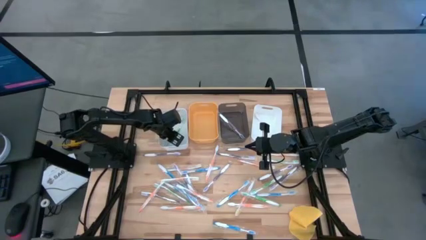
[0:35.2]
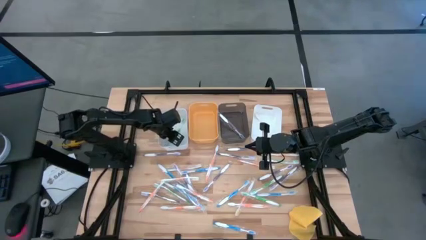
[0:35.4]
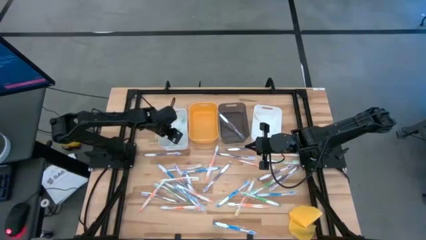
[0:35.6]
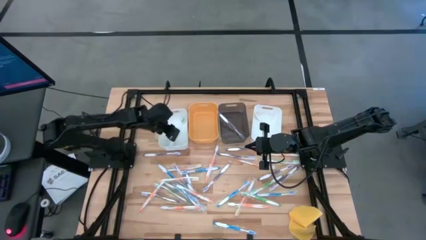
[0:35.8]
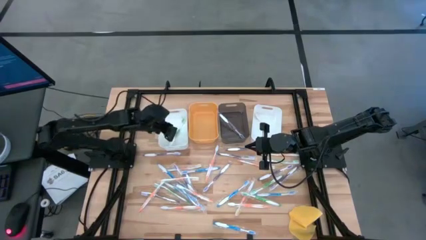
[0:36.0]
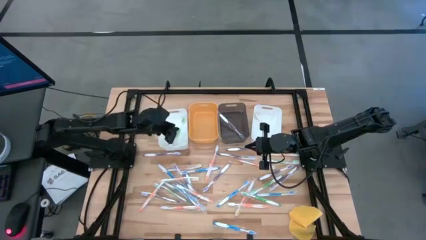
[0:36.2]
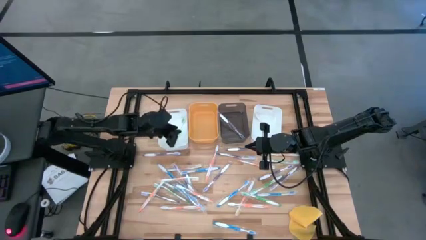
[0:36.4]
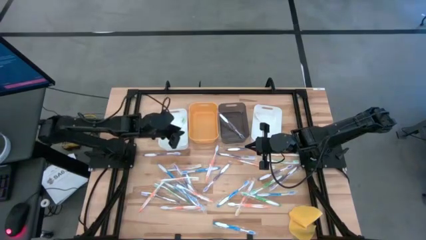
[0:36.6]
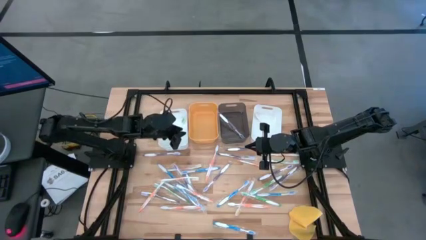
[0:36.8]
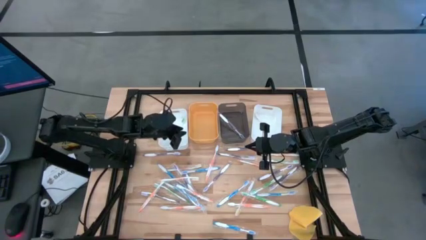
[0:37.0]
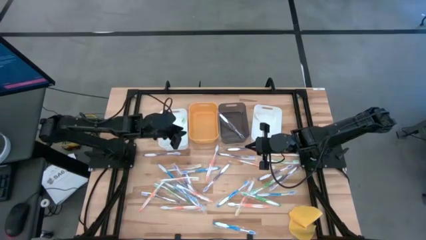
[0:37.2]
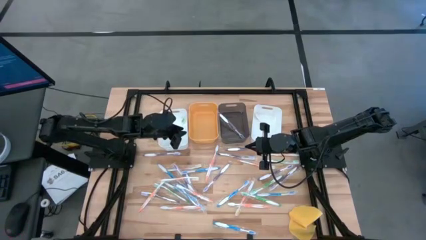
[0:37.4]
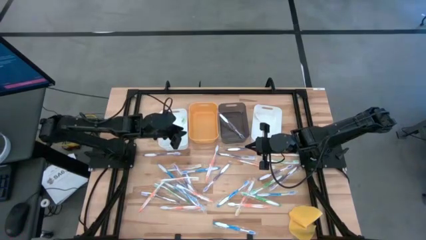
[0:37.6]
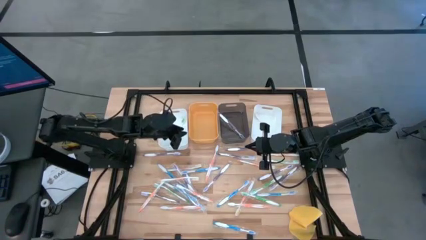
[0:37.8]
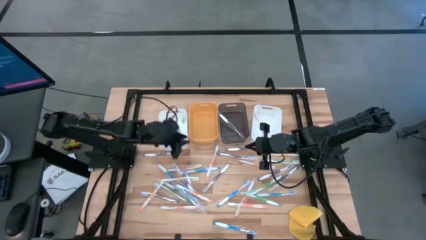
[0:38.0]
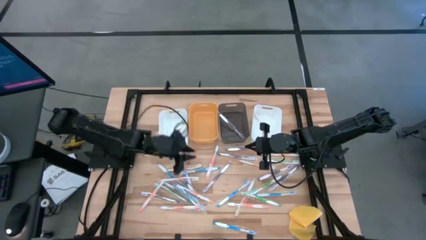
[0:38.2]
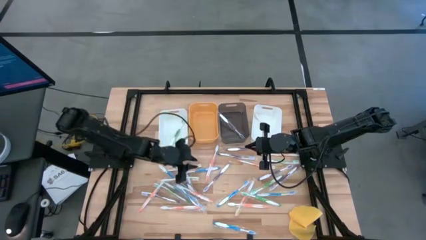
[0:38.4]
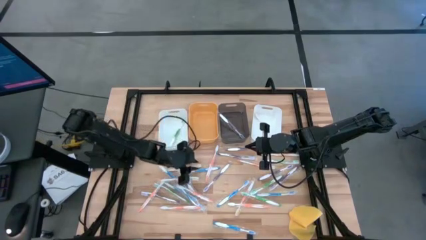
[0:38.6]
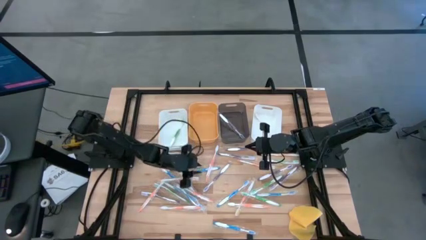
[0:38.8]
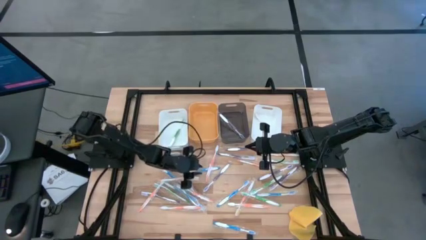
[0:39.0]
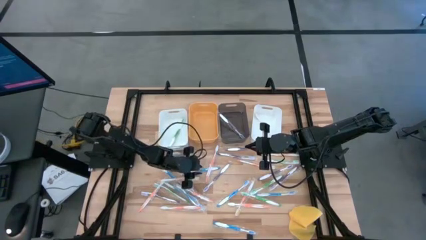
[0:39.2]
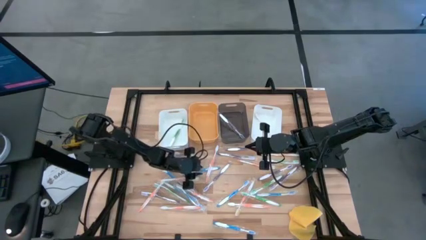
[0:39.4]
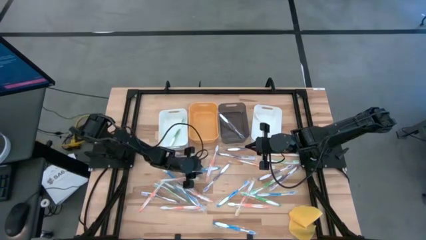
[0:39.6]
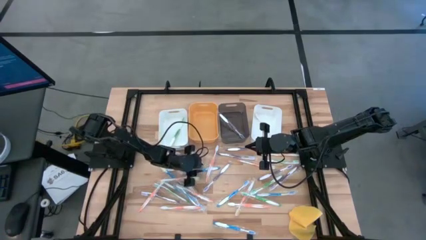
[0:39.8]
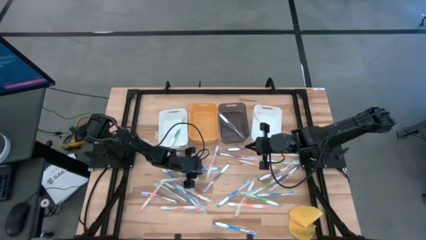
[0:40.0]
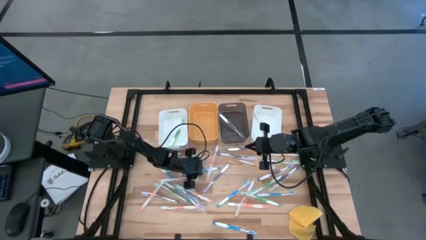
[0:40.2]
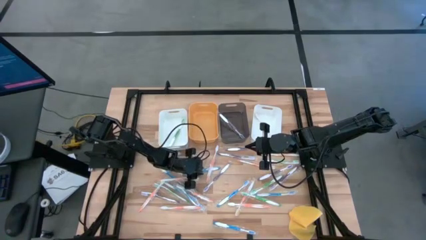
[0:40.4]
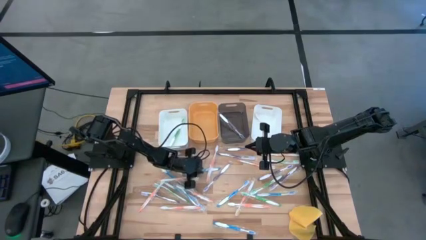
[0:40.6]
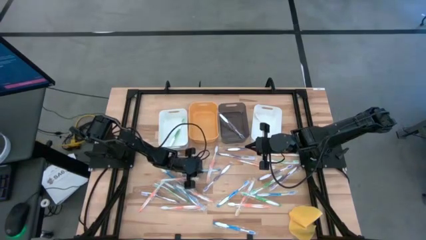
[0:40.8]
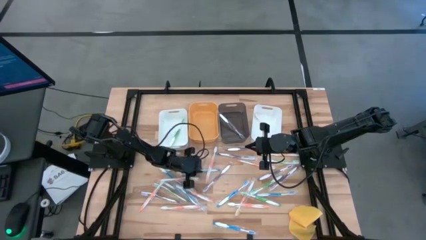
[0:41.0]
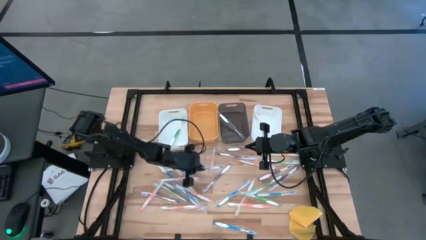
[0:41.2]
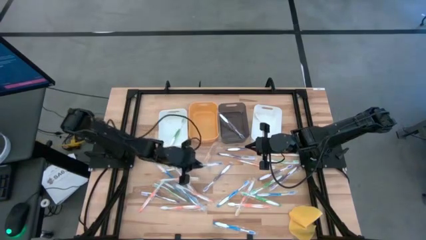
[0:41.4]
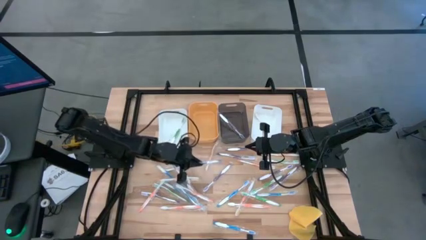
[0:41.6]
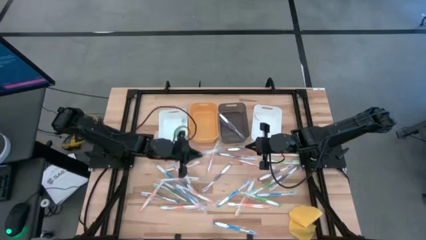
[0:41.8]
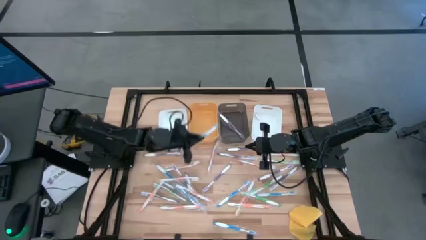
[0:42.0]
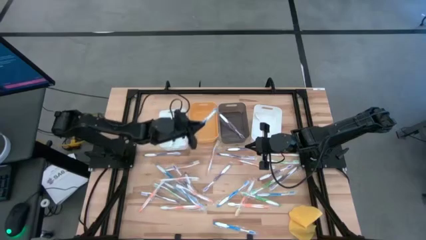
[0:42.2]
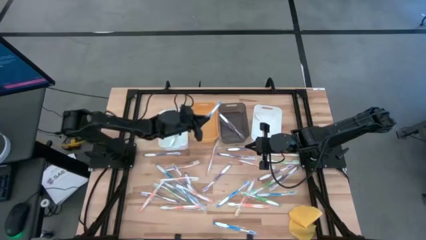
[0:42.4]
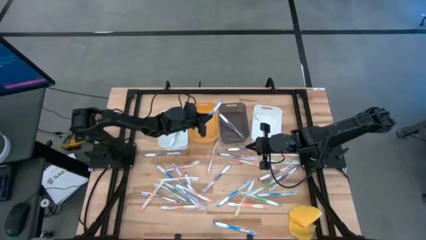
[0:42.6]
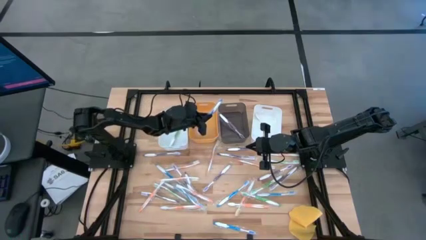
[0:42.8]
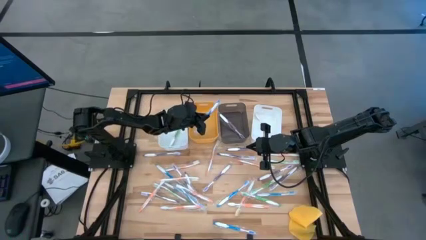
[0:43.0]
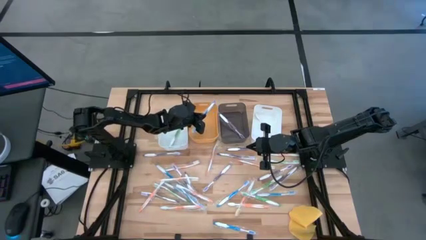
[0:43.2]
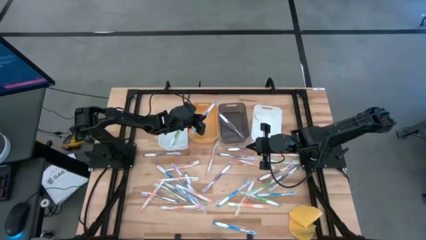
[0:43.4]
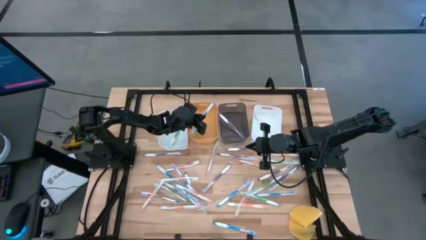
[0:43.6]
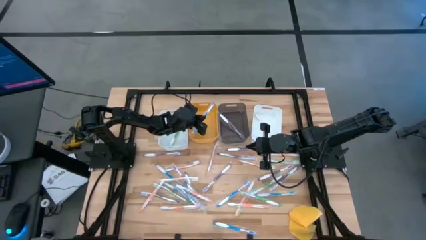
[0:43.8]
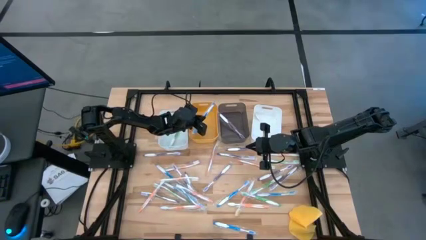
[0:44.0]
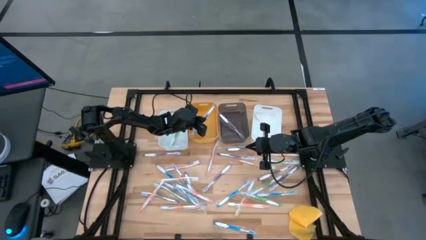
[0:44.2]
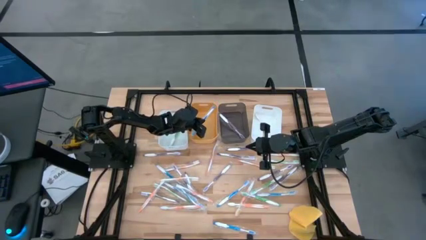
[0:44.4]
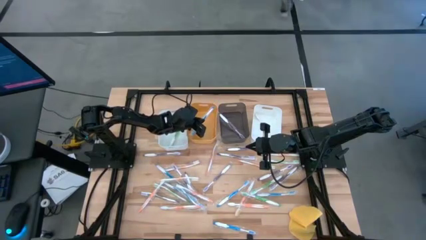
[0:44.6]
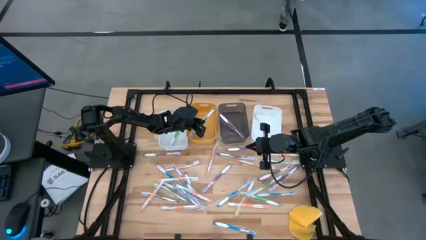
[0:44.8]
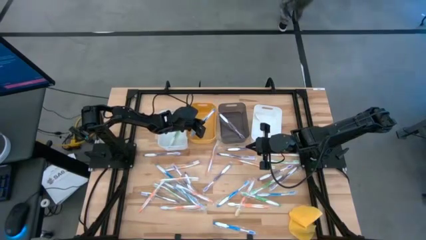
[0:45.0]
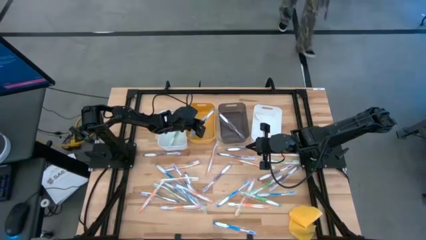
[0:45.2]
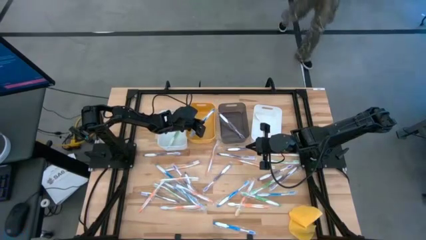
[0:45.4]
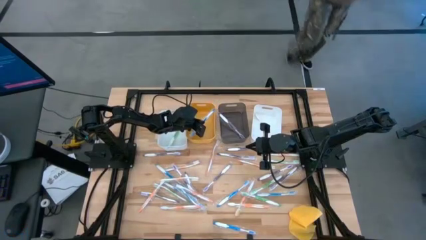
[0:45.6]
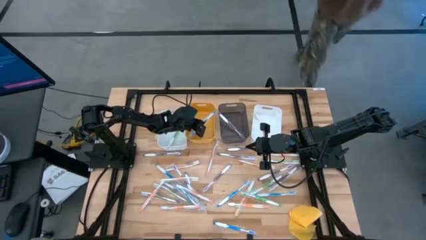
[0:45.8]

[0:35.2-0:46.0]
Task: Pick & Place Toothbrushes
Put the blue toothbrush into the orange bin

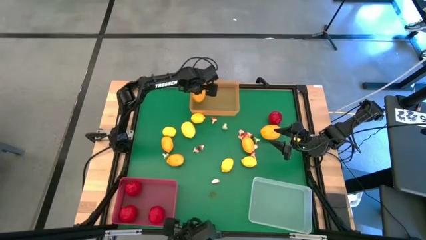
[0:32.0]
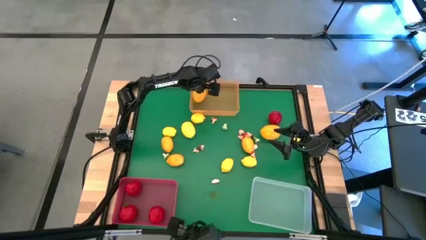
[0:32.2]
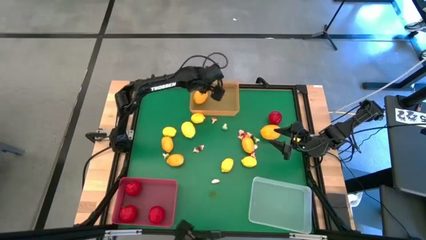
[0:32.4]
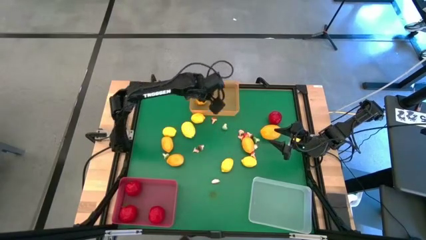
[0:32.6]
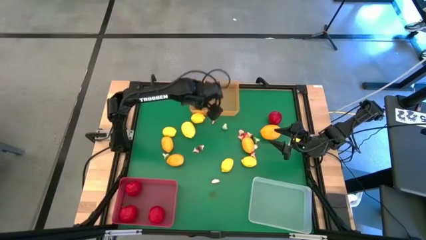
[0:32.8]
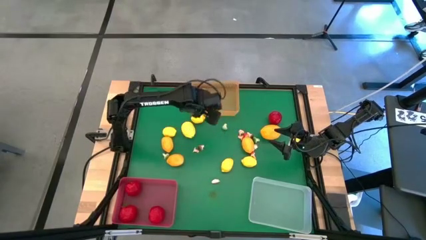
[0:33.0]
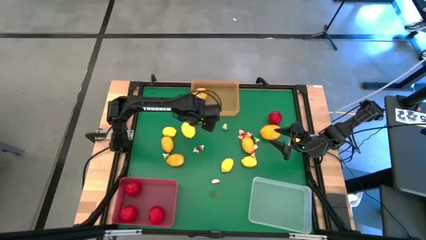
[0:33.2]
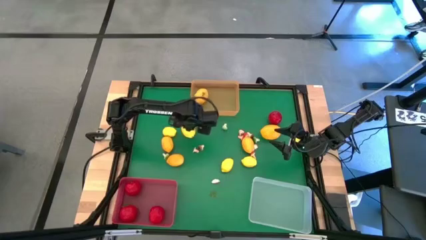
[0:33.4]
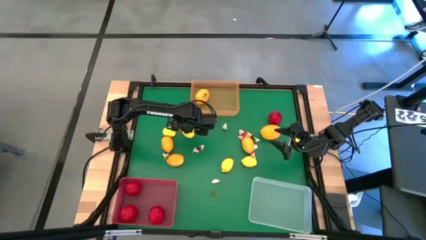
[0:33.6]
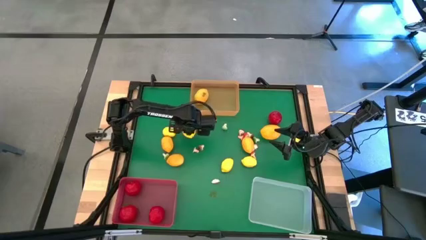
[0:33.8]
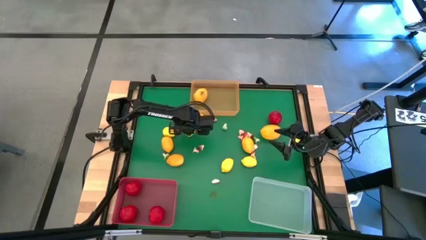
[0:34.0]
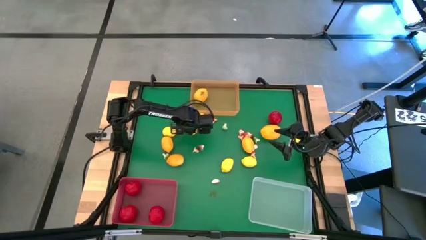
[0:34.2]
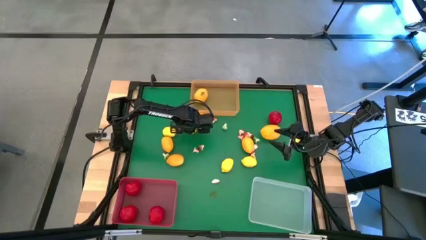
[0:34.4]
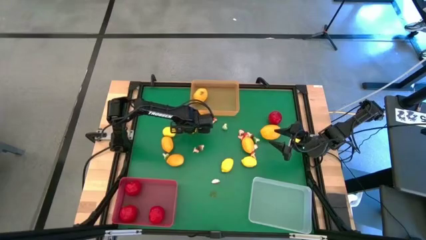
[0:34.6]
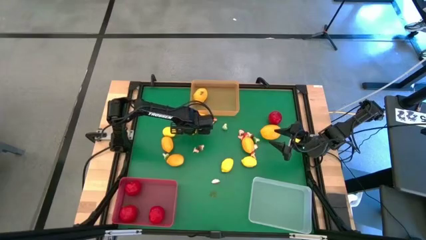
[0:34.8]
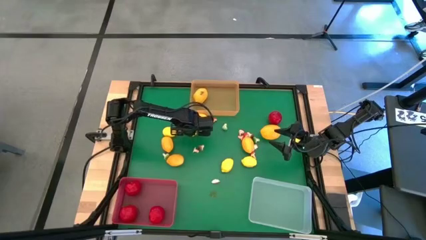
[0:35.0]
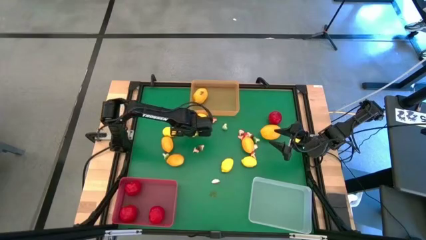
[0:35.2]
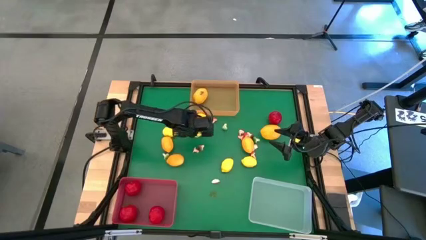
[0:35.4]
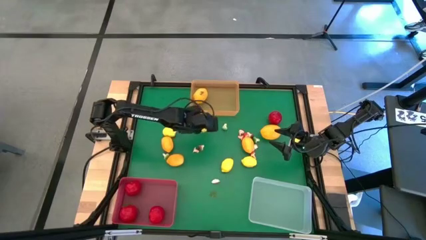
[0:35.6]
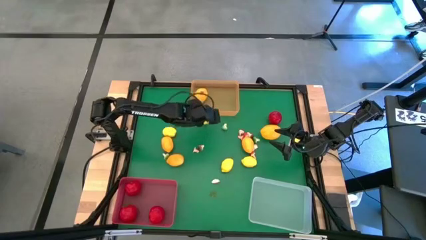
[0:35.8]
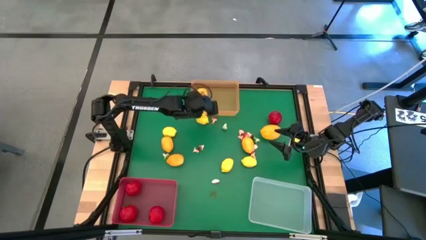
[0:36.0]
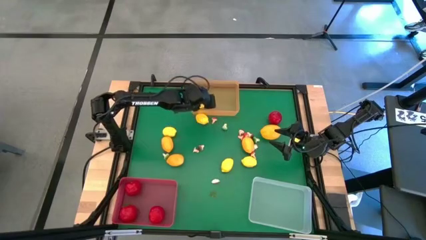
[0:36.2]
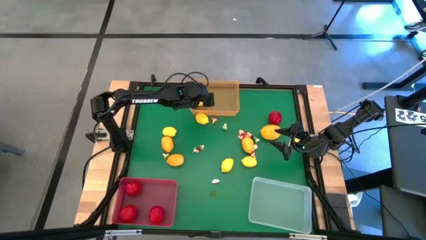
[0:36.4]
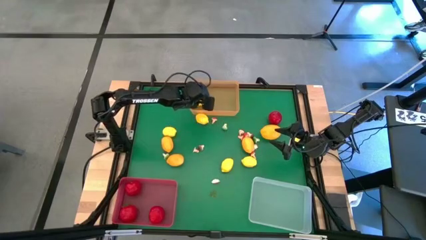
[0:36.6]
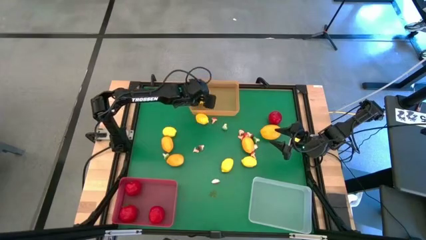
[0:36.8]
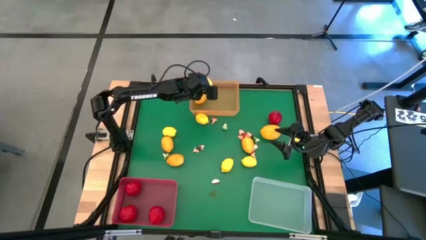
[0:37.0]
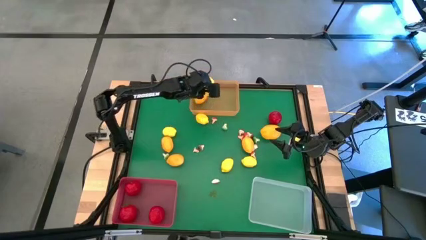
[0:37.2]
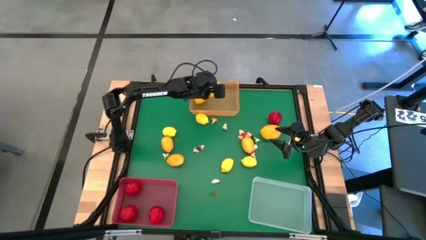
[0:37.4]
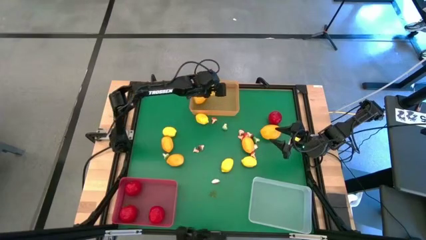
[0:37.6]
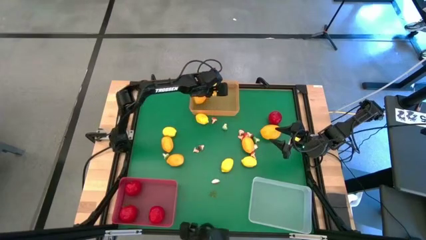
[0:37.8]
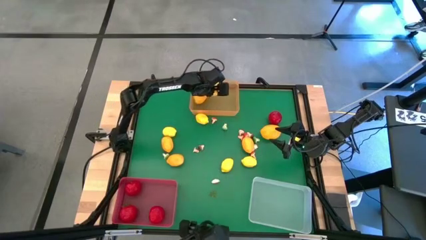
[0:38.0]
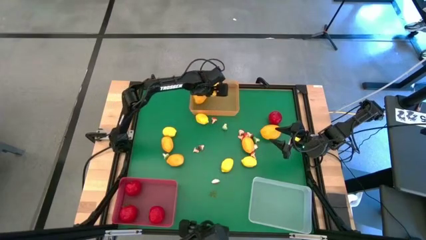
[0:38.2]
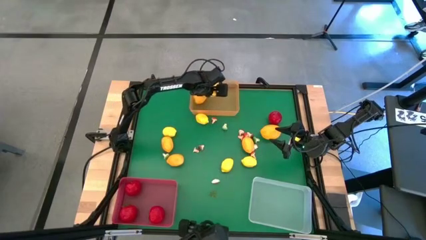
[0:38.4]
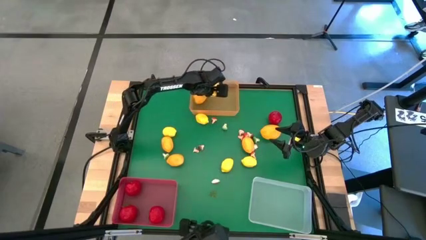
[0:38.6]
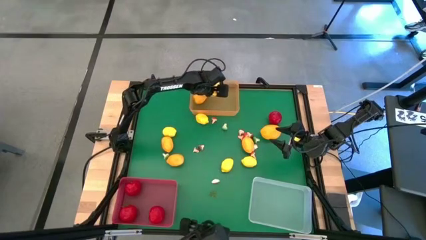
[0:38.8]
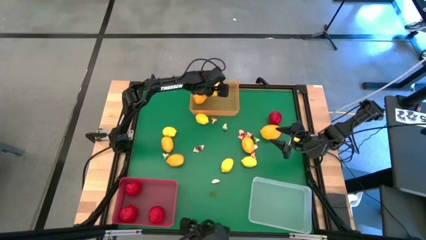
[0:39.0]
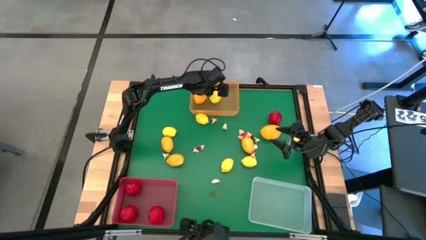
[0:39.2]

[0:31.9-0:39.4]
Task: Sort produce into baskets
Put the yellow lemon into the orange bin
